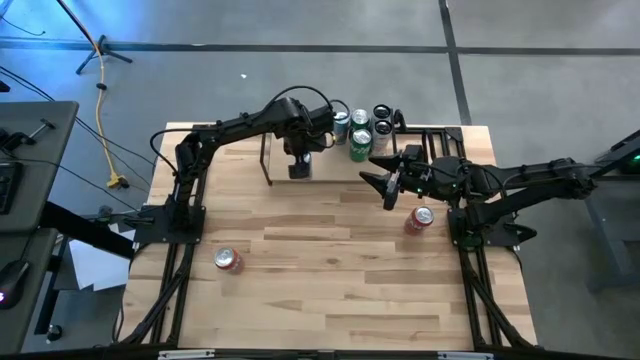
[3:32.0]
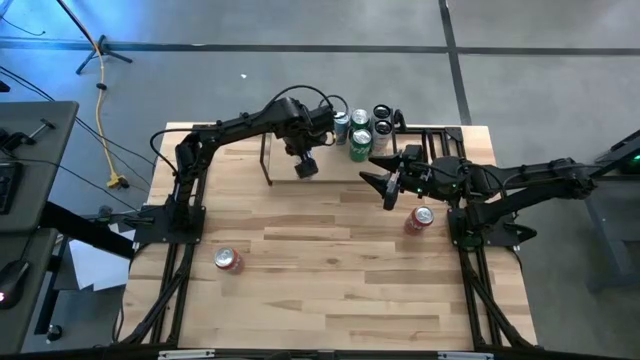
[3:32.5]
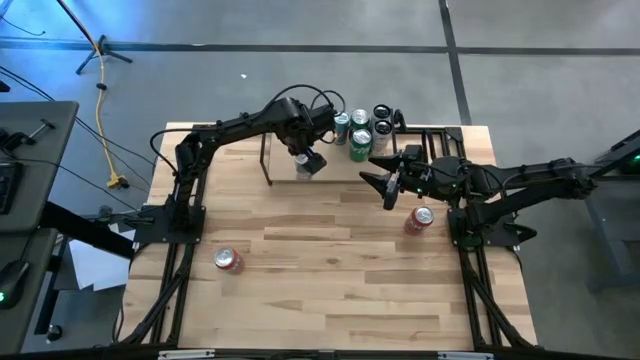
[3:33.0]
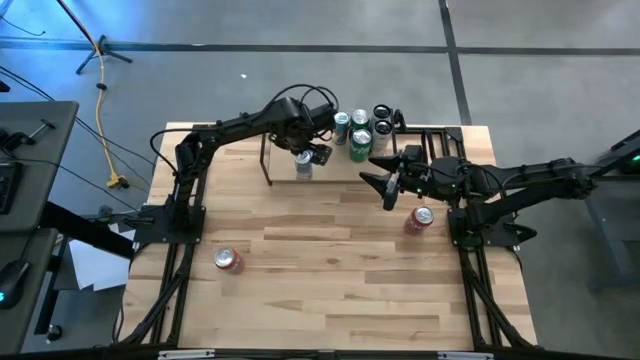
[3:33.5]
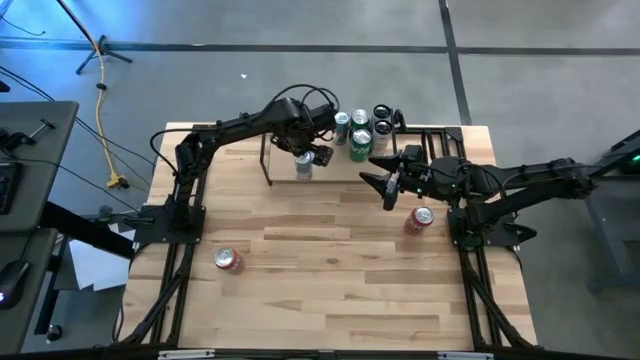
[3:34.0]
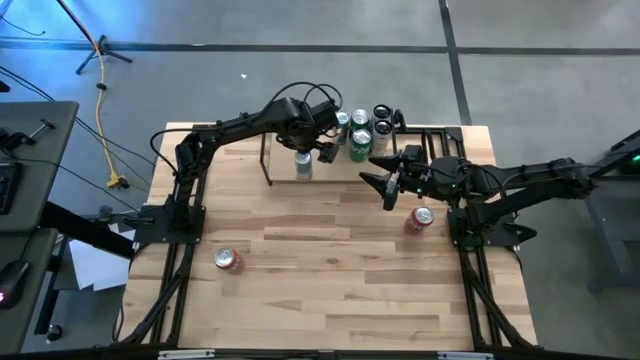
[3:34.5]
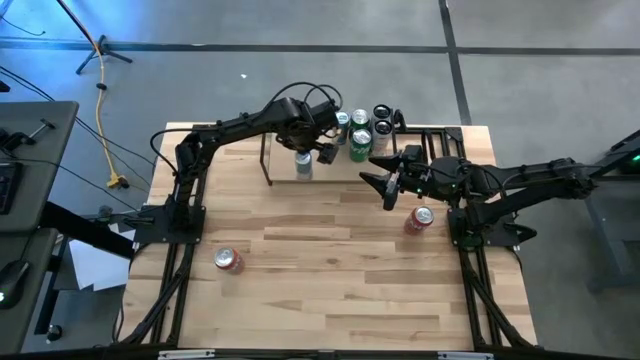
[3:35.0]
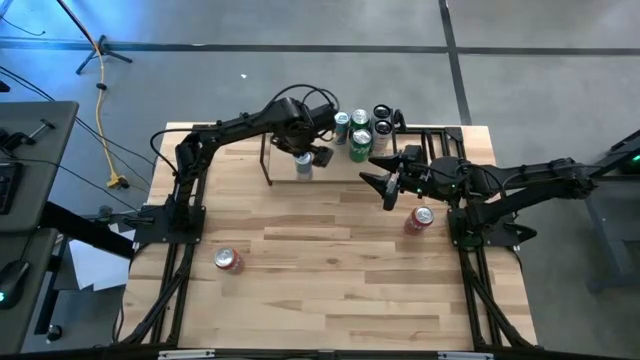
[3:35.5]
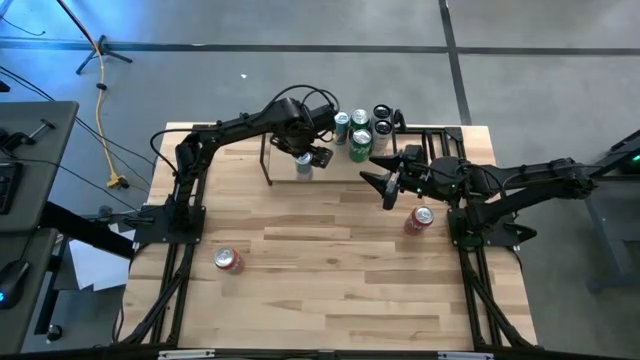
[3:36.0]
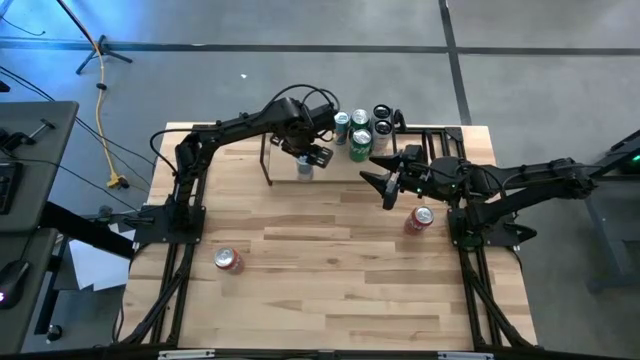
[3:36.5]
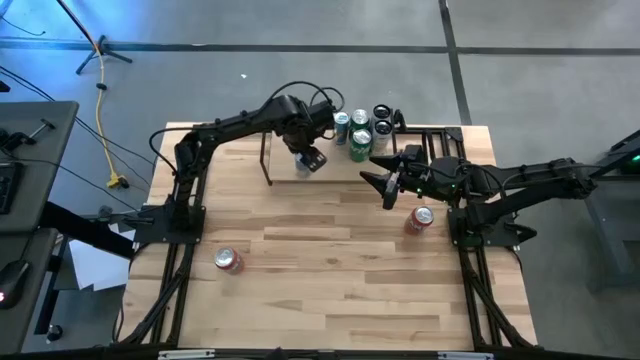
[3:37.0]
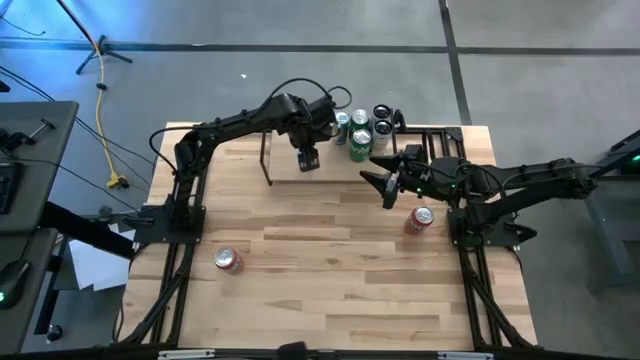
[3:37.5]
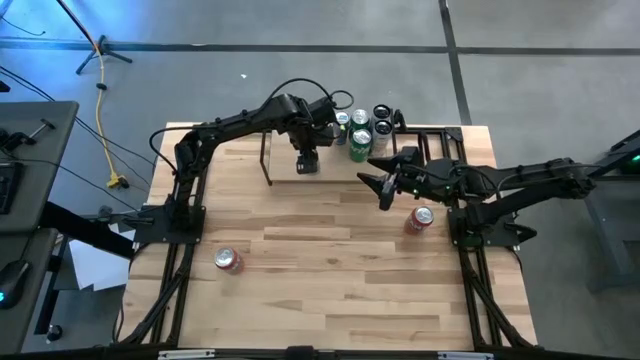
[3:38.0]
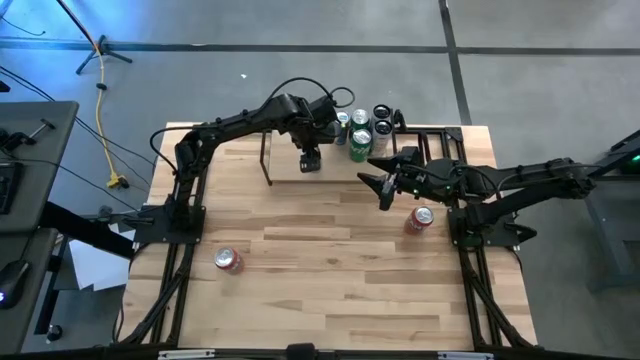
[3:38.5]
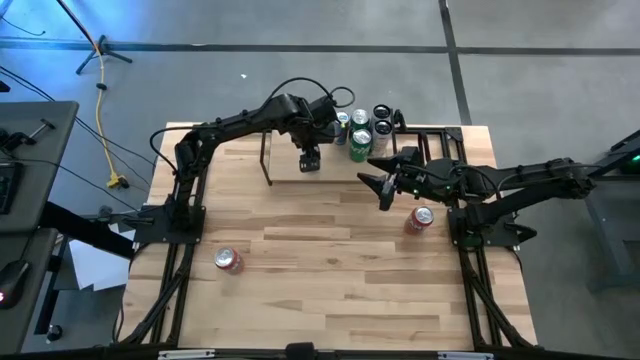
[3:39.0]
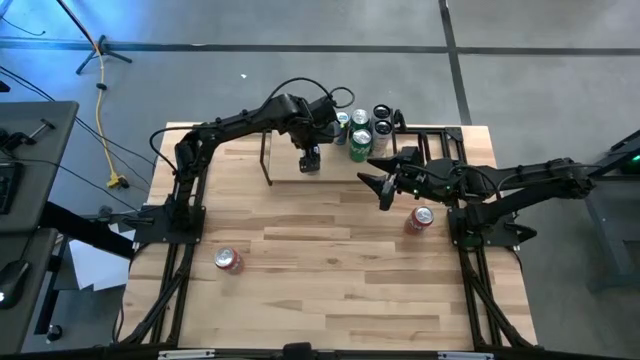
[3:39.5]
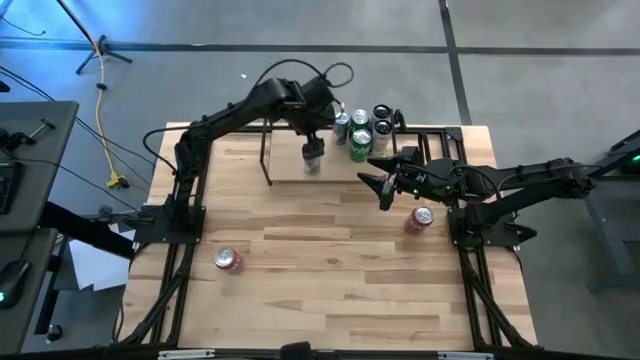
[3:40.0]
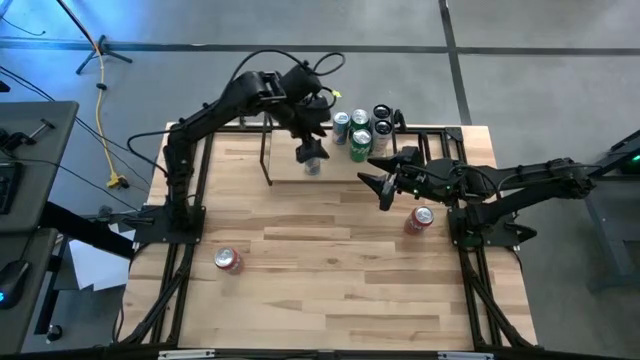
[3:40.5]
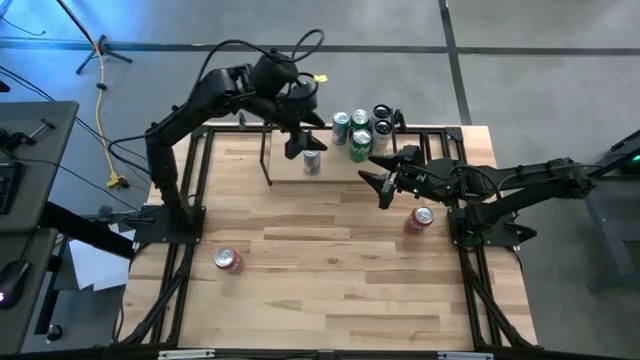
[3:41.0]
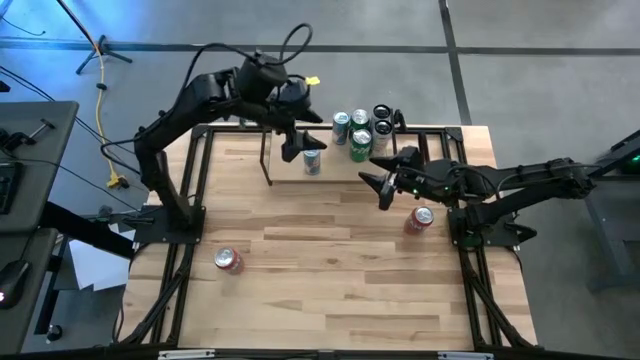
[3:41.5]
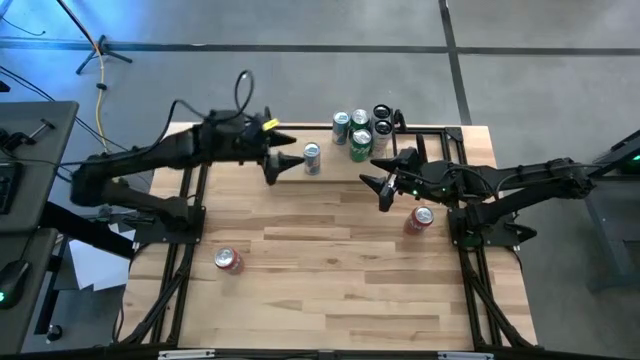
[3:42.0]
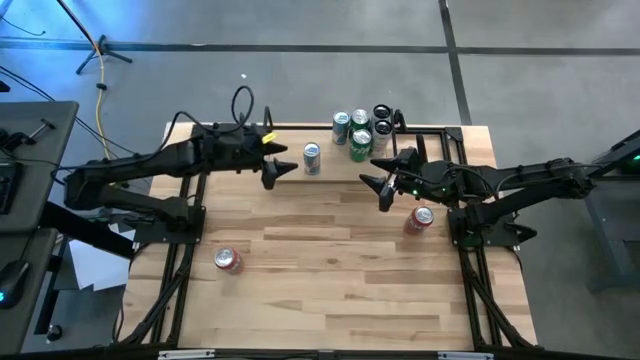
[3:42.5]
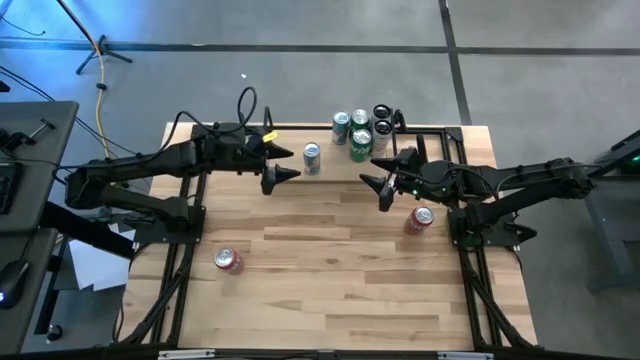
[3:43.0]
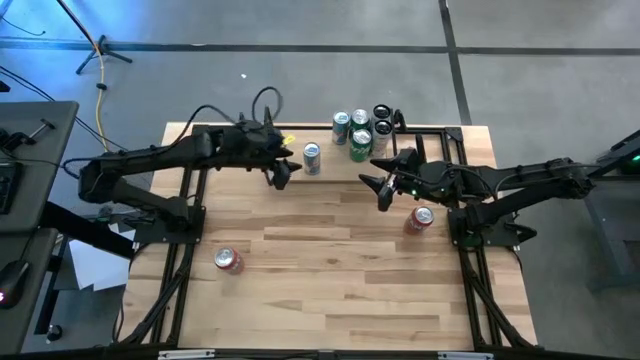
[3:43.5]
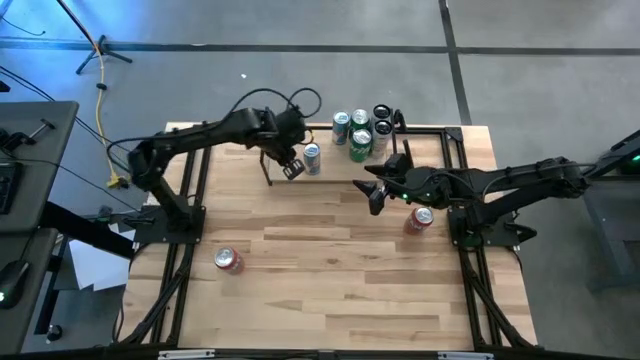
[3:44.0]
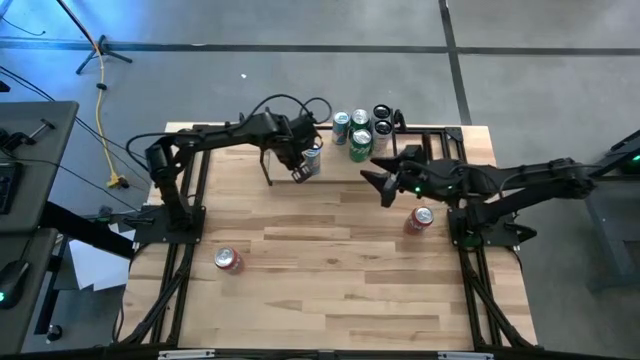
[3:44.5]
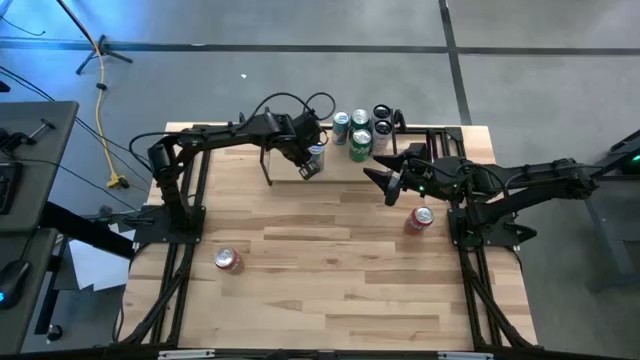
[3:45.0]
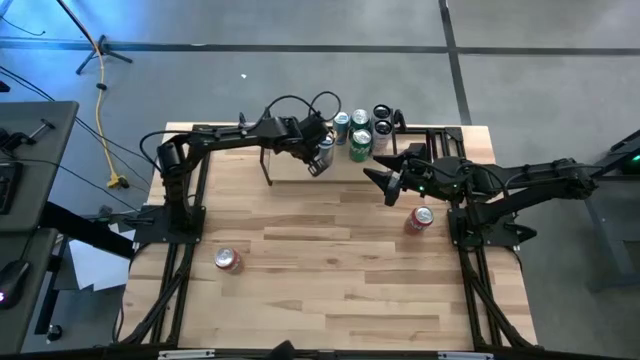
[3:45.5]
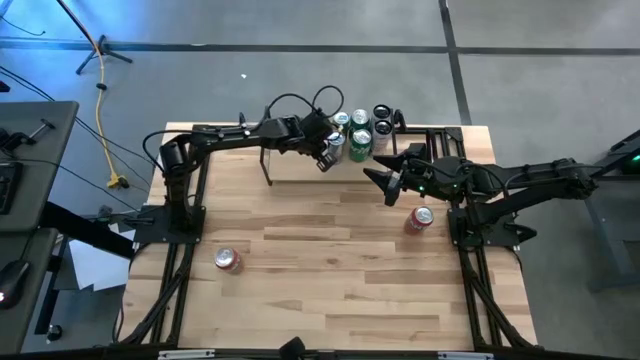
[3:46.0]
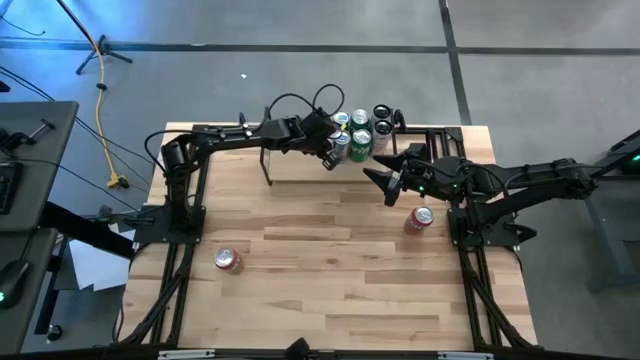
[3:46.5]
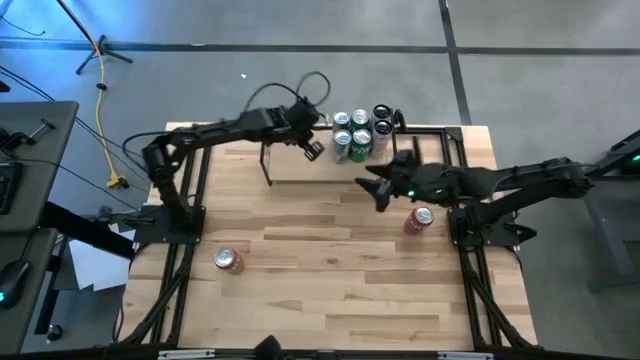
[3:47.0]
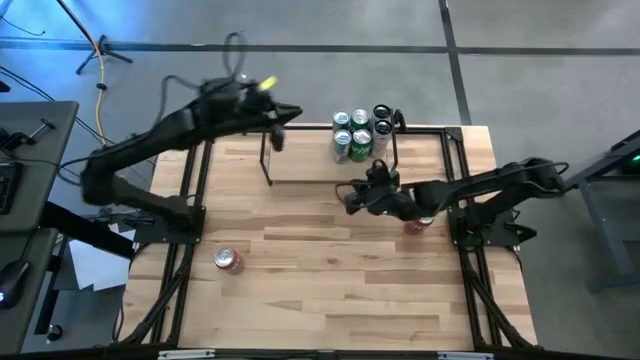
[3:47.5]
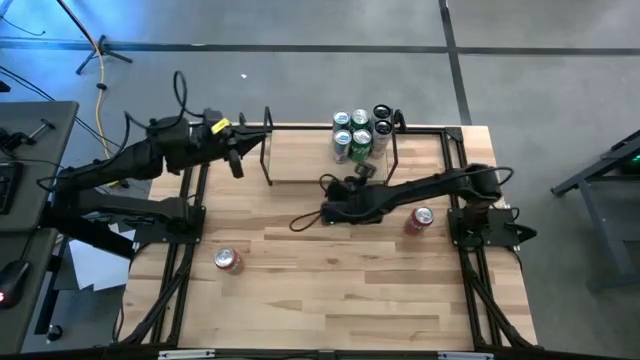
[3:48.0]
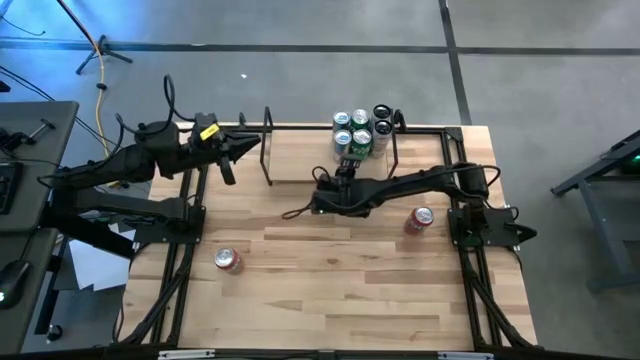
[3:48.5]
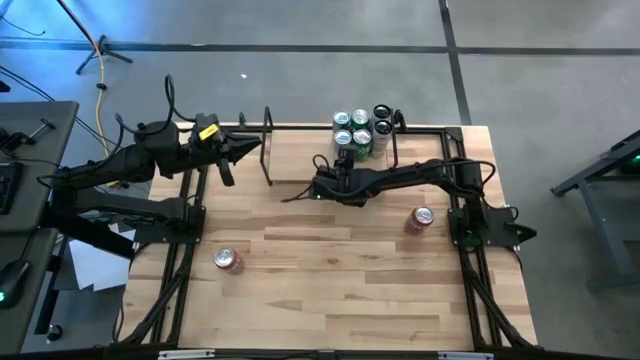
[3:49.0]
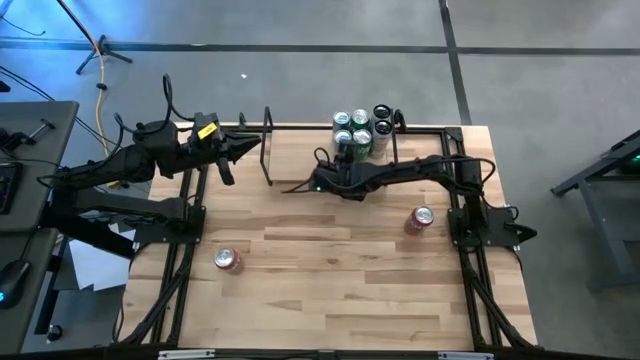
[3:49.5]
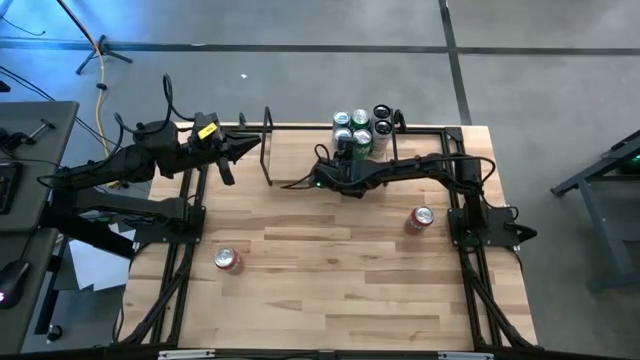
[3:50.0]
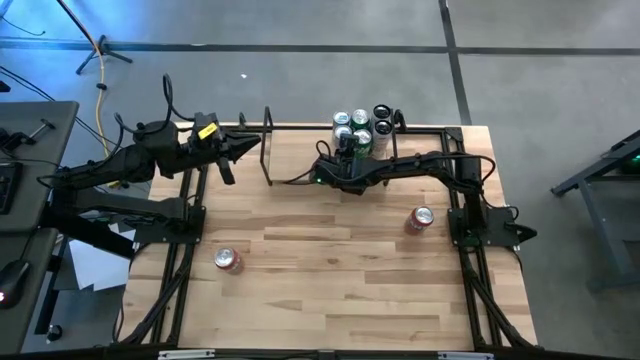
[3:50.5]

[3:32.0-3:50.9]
Task: Place canned beverage on shelf
Put the blue soda can on the shelf and align it with the other blue soda can

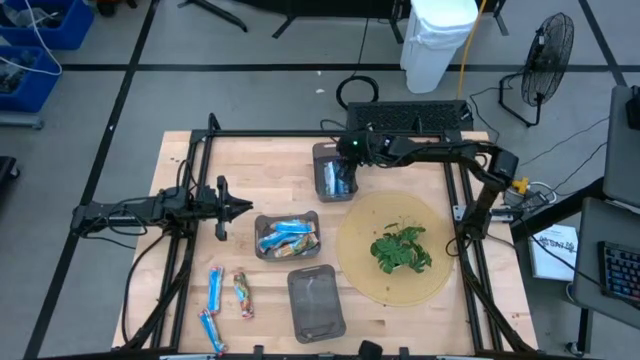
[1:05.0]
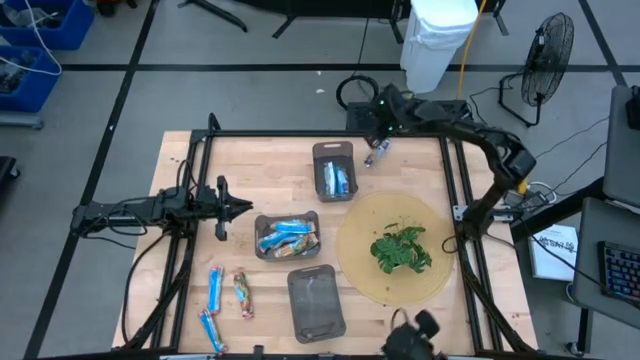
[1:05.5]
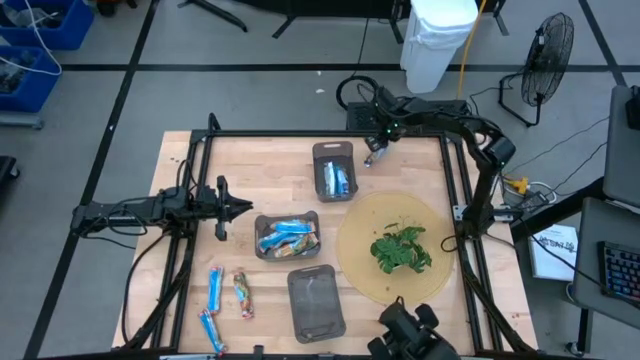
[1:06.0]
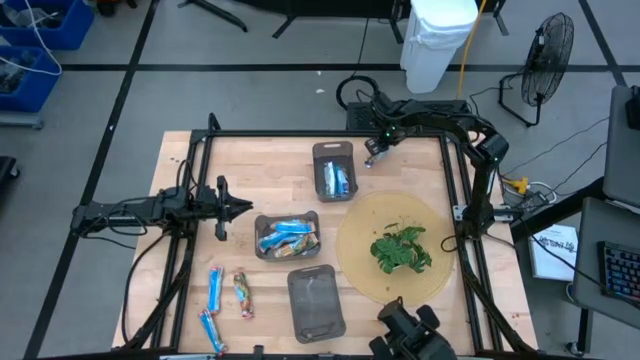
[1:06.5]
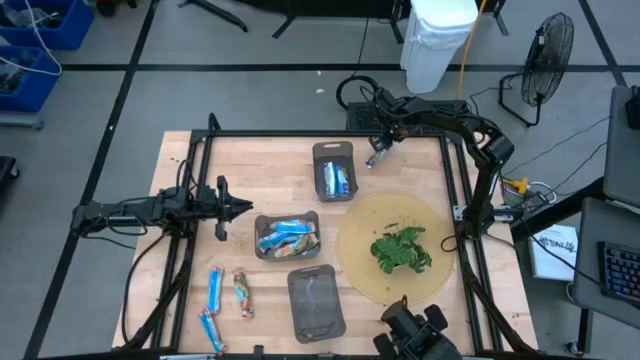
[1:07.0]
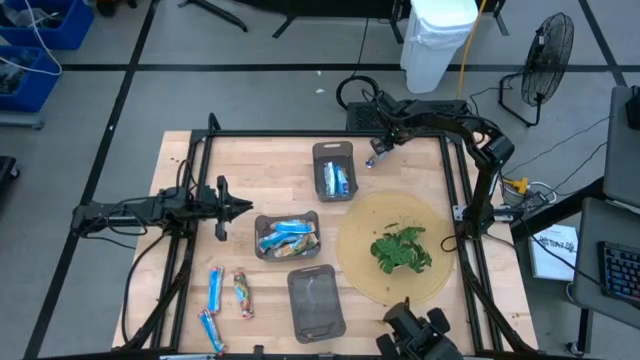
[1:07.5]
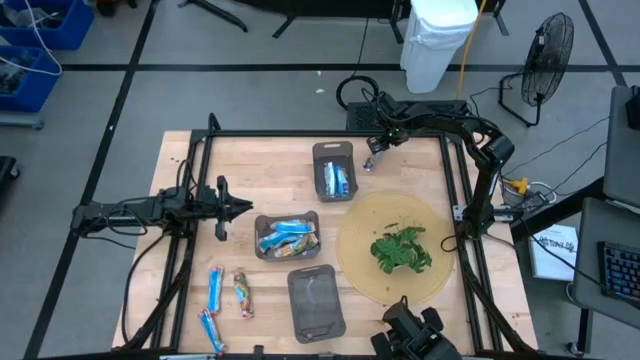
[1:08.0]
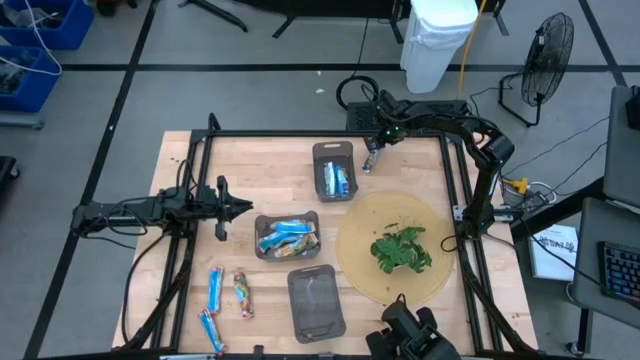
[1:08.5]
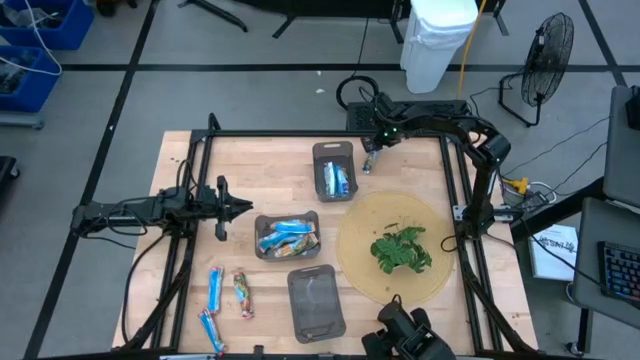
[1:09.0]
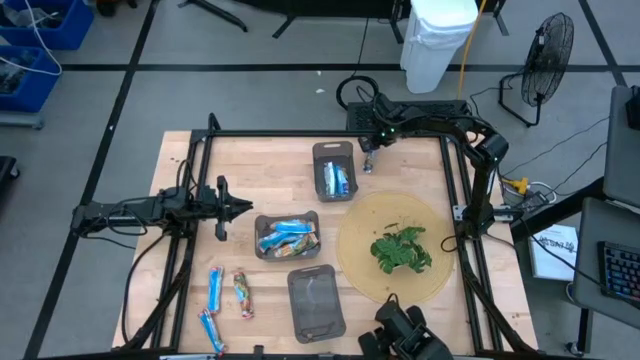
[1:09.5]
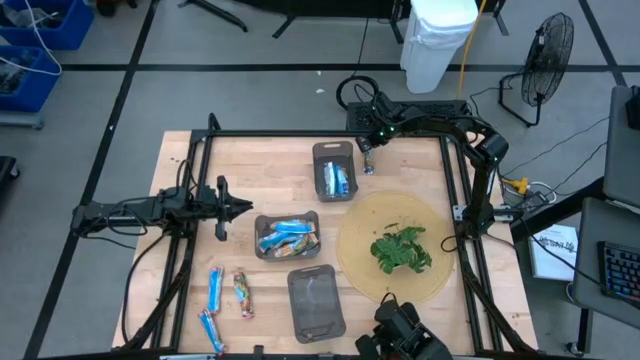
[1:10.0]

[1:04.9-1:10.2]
Task: Pick and place Granola Bars by type
Put the blue granola bar into the top black bin
